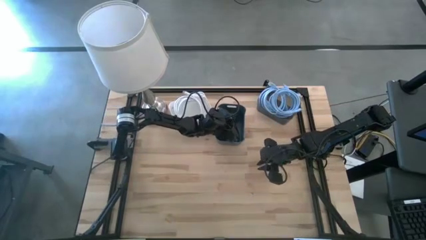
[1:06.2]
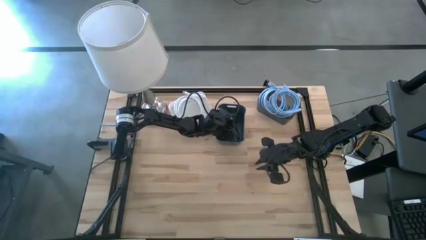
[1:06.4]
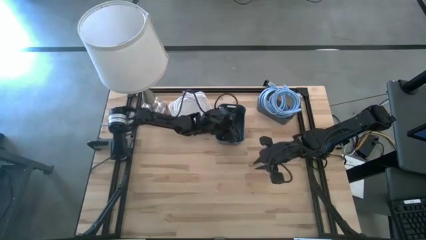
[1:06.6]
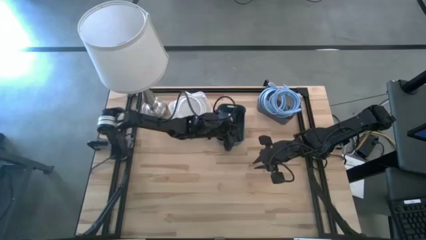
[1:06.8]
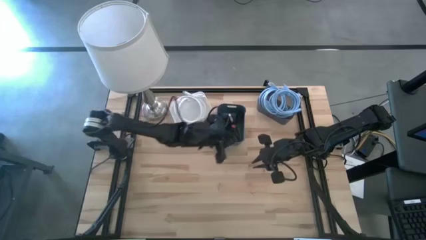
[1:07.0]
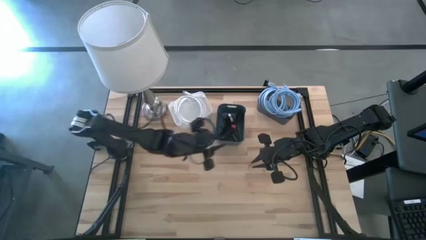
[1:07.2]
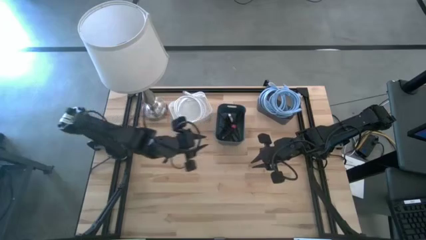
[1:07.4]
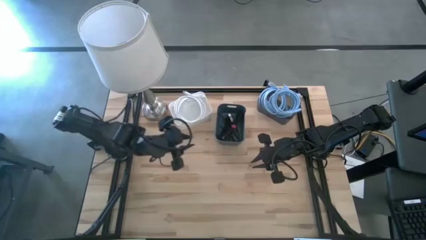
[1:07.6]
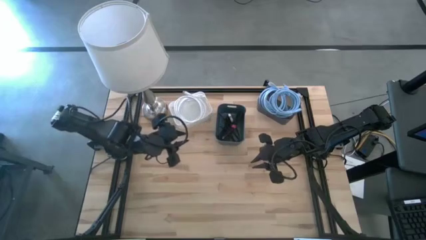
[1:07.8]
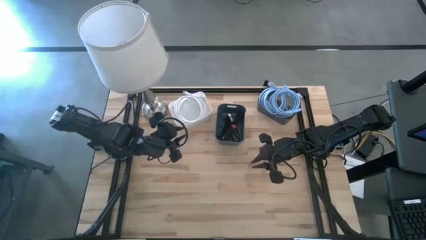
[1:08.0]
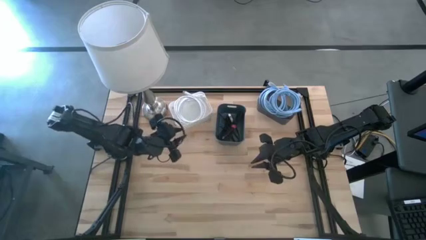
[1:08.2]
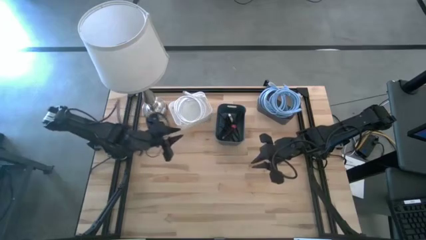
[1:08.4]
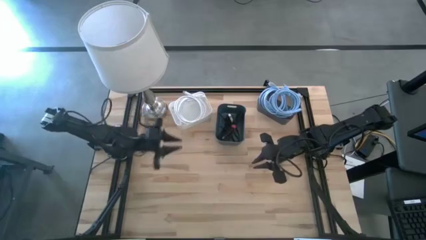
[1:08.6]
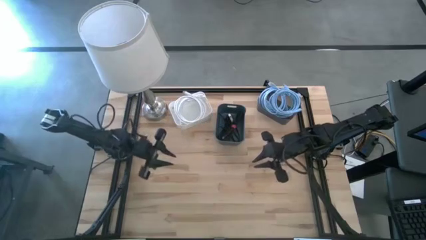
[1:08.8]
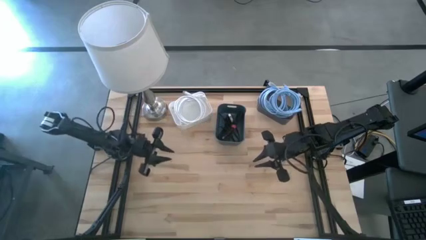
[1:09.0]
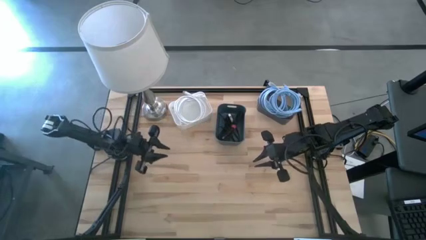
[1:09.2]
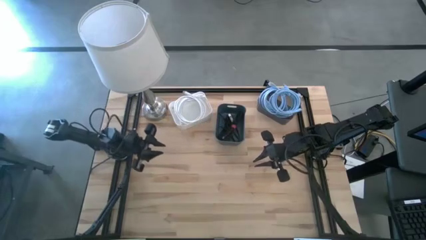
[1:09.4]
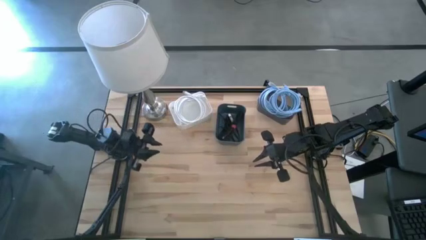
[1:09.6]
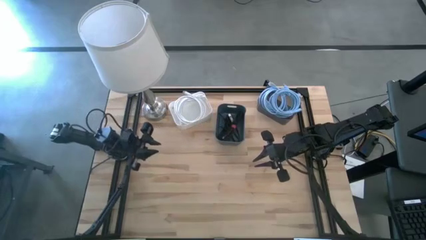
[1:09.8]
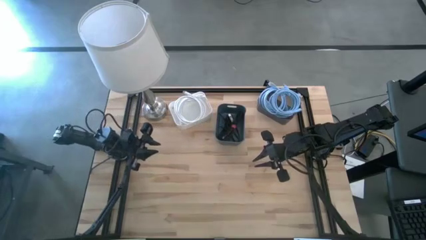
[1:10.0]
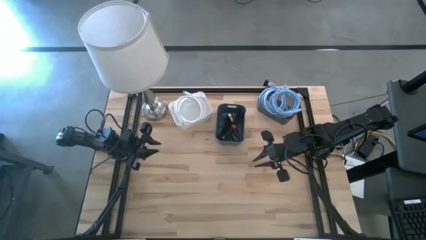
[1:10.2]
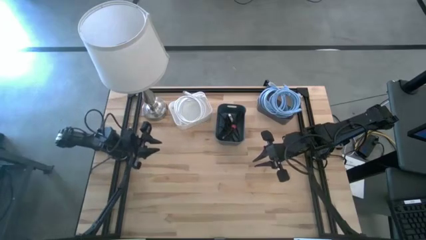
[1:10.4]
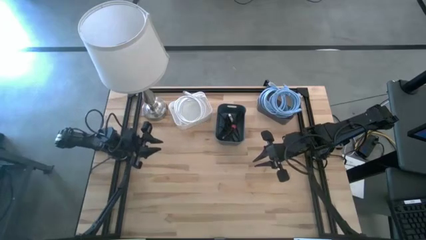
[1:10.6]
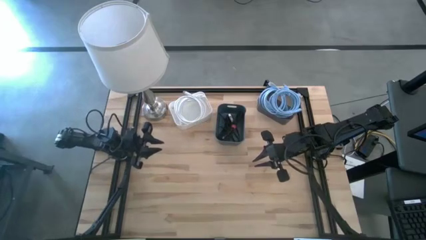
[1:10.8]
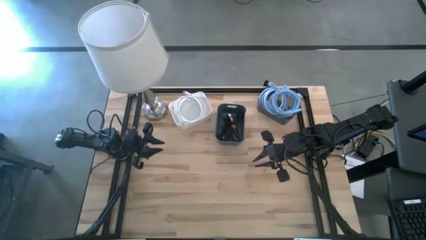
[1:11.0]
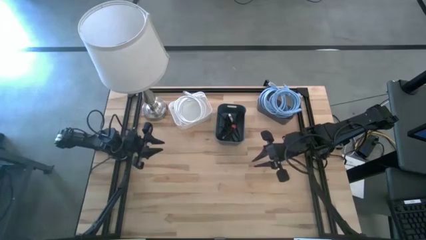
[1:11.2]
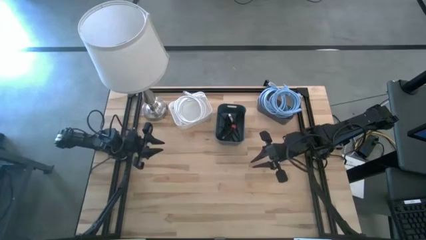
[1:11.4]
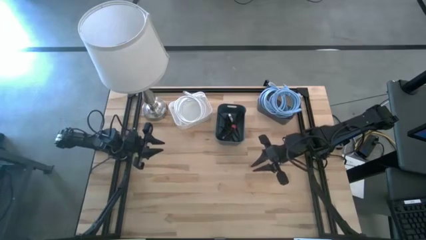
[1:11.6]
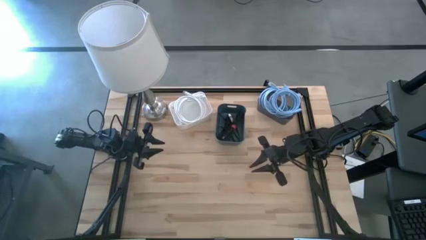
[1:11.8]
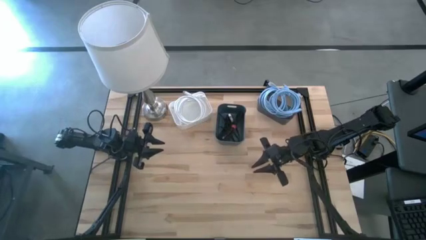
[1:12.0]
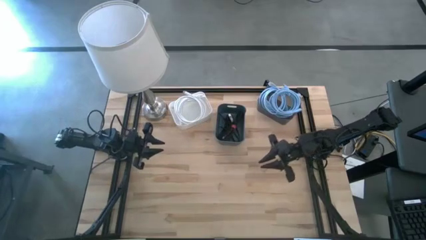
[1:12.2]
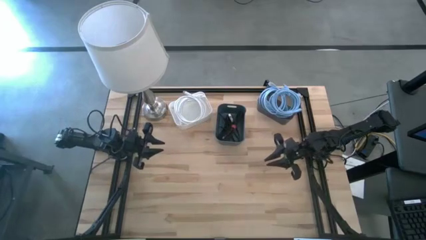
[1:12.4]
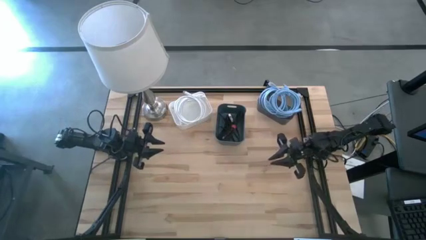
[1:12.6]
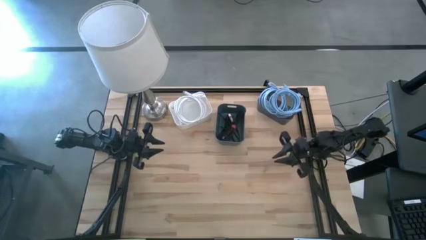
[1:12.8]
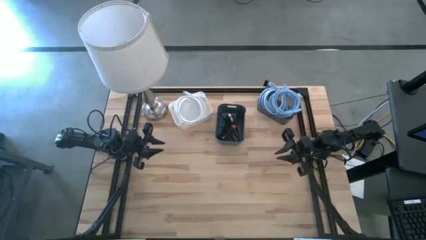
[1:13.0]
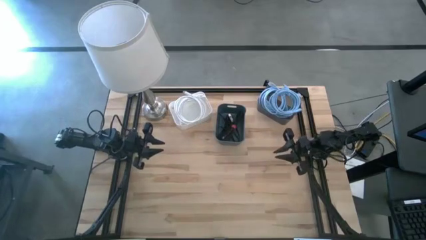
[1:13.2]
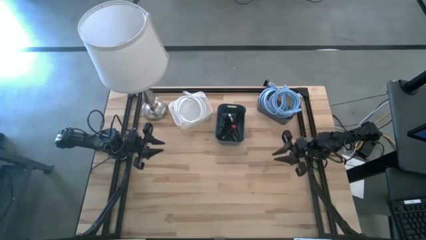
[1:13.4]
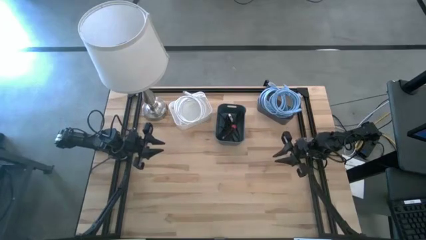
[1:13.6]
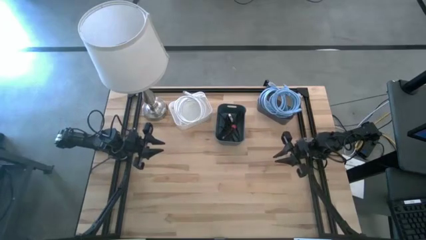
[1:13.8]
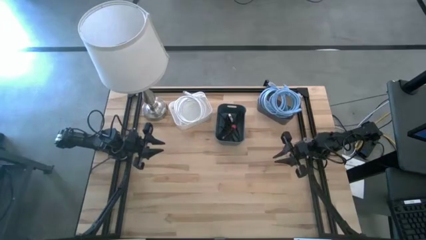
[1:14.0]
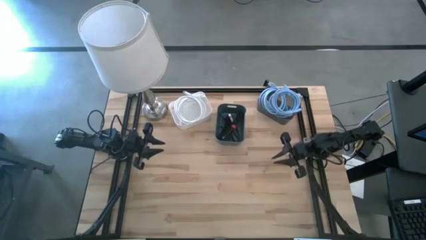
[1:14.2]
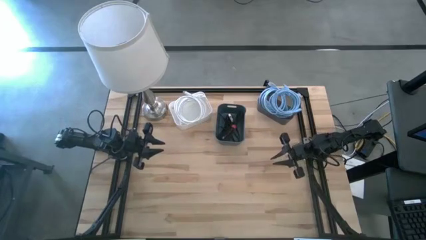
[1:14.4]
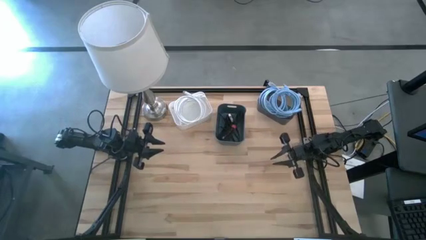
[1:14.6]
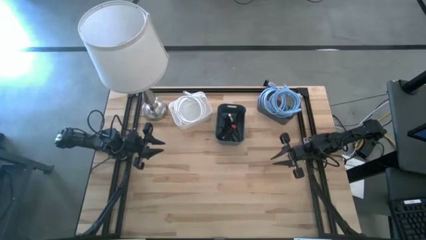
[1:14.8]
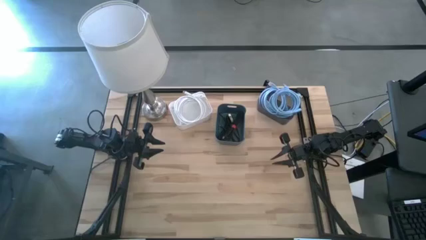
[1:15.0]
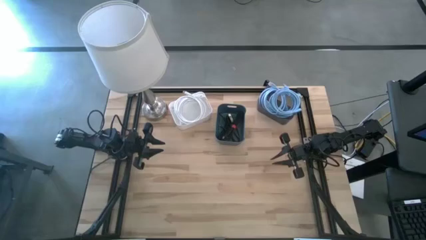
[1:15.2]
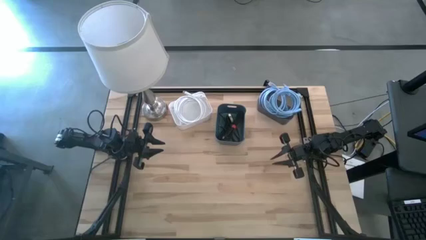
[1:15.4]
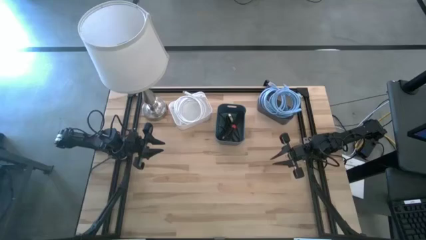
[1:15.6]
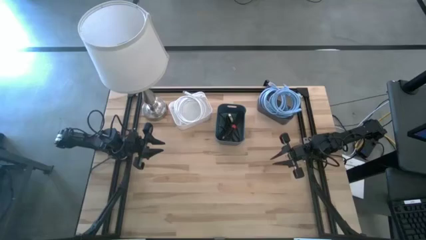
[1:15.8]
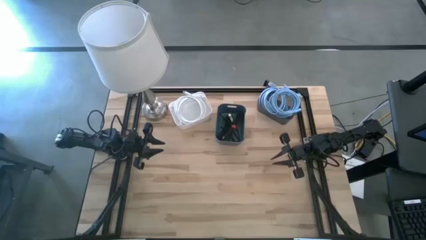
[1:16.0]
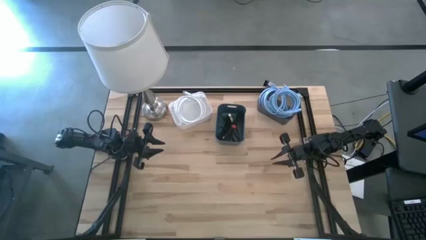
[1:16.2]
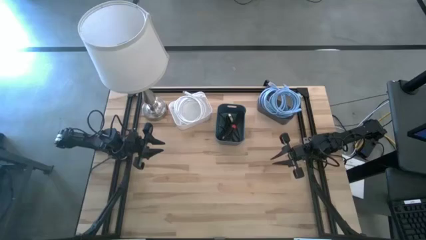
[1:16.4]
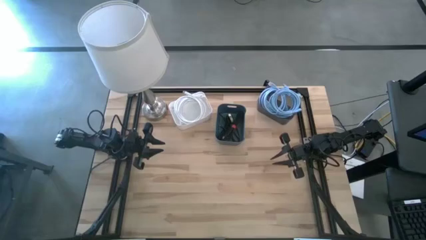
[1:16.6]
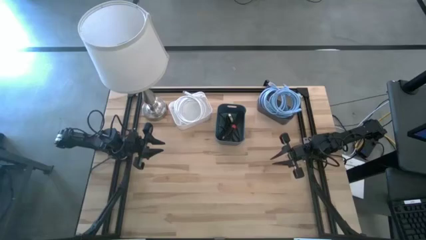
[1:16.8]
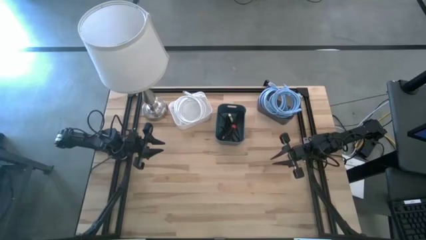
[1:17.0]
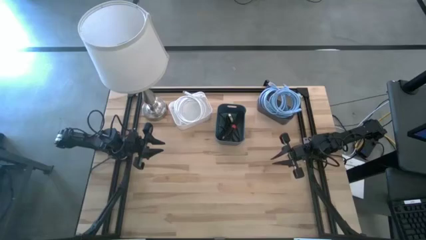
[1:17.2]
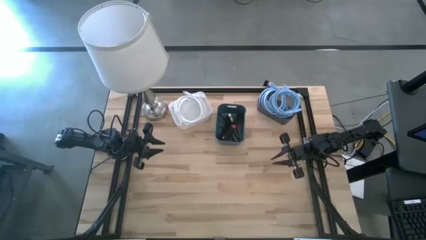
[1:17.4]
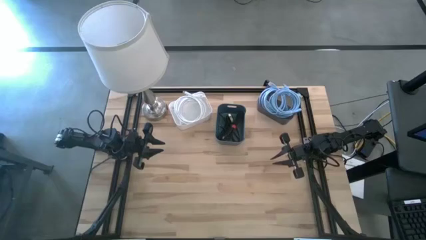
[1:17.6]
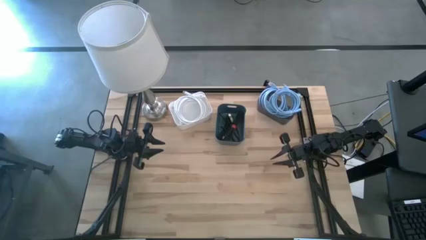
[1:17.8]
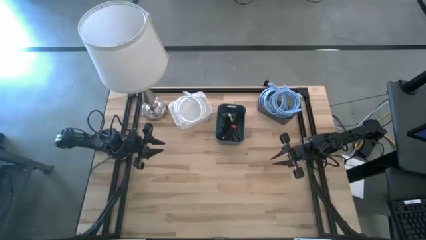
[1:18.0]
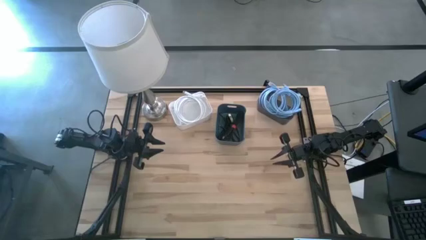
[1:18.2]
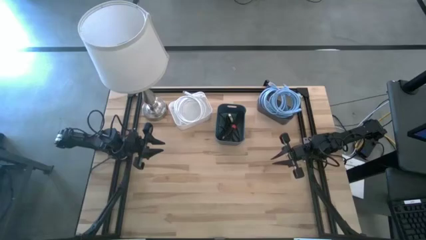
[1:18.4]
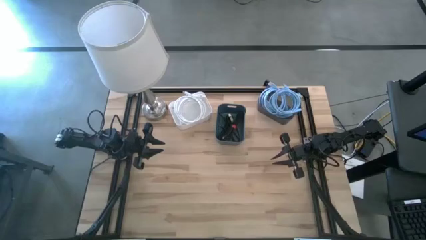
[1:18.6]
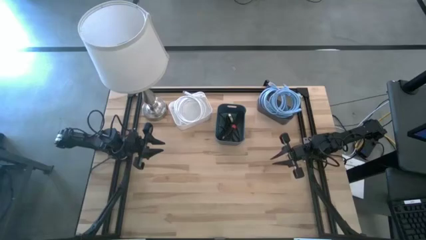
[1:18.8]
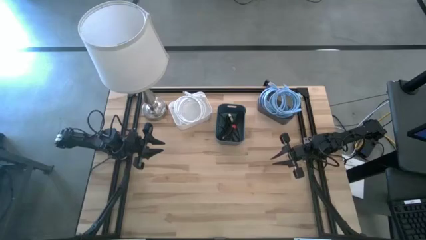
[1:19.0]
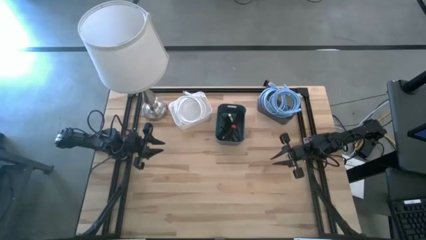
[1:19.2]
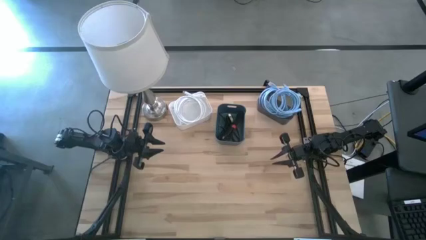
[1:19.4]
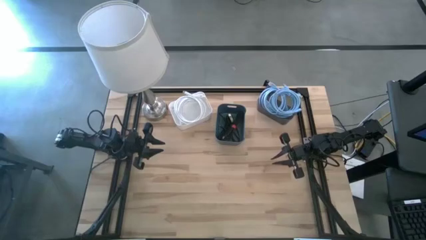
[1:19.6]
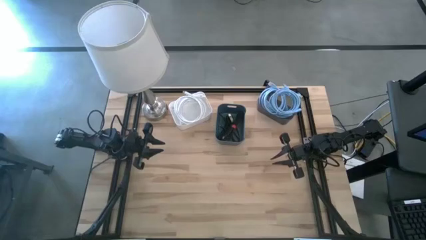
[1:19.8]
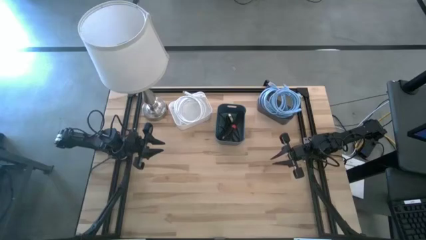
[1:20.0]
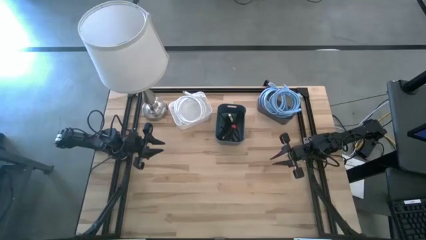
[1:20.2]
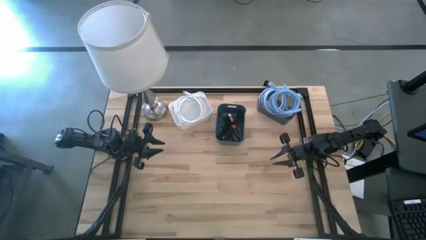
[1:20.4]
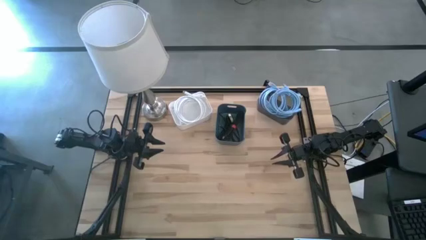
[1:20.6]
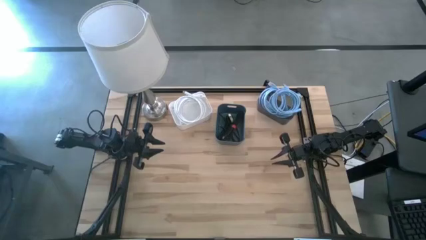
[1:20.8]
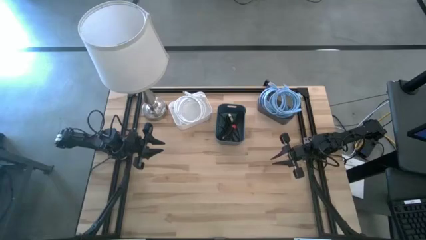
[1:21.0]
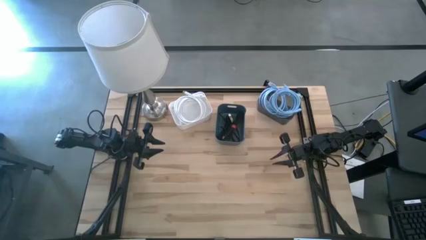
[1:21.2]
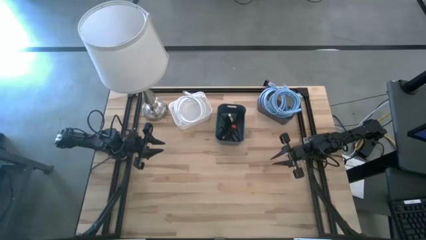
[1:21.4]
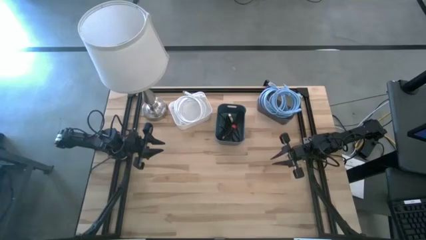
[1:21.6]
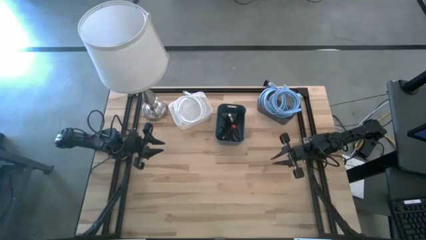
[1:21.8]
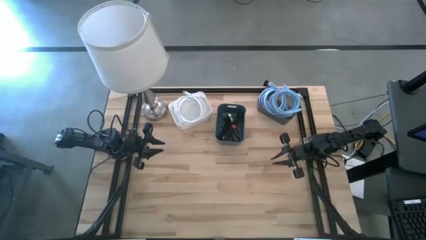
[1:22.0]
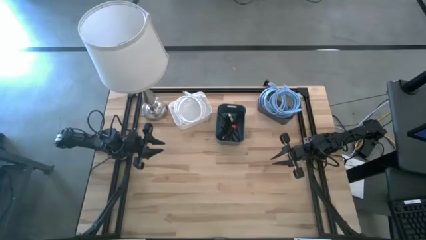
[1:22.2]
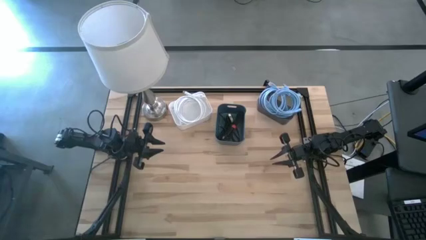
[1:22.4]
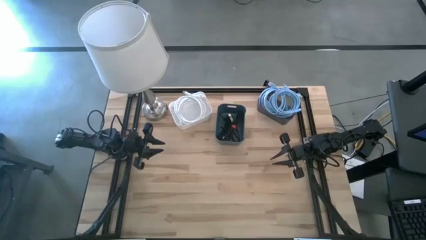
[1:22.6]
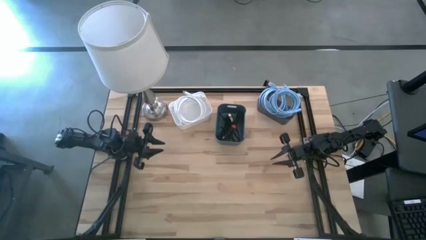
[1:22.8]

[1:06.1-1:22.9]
Task: Sort HDMI cables
Return to Home Position

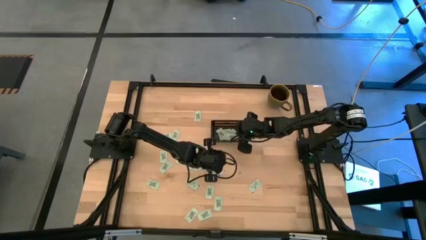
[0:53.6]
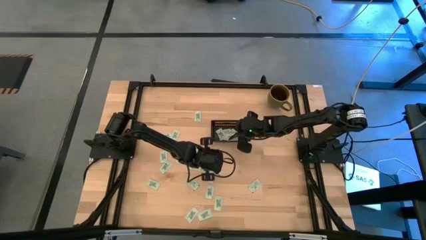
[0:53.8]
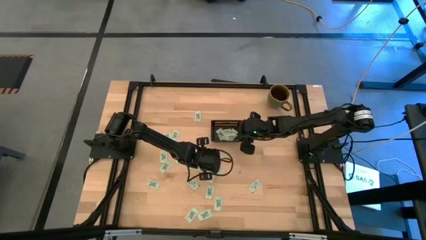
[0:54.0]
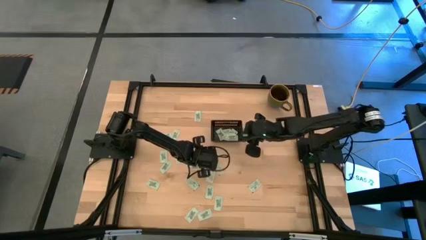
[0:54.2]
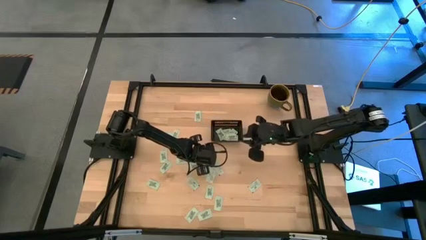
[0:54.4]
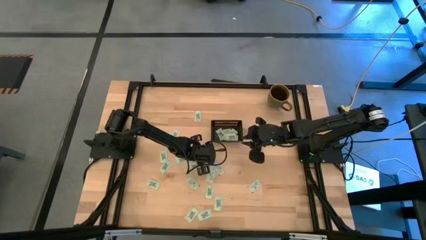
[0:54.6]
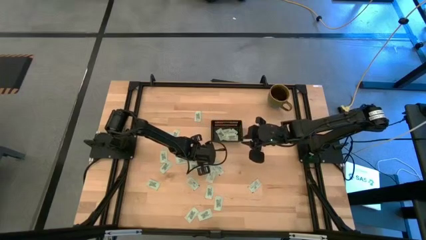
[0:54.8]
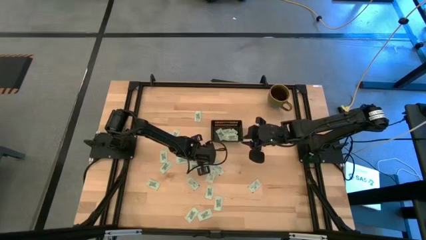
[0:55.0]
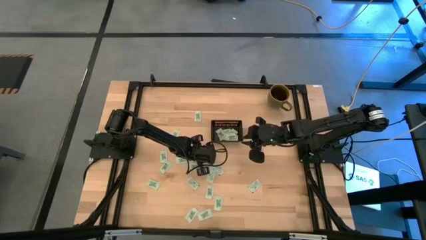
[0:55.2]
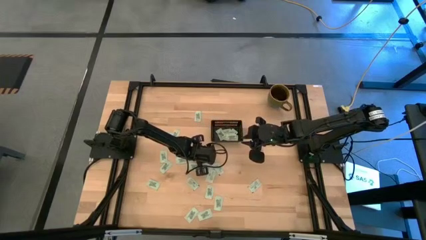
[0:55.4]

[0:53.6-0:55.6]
Task: Pick and place Stevia / Truvia into bins
Put the stevia packet into the black basket
